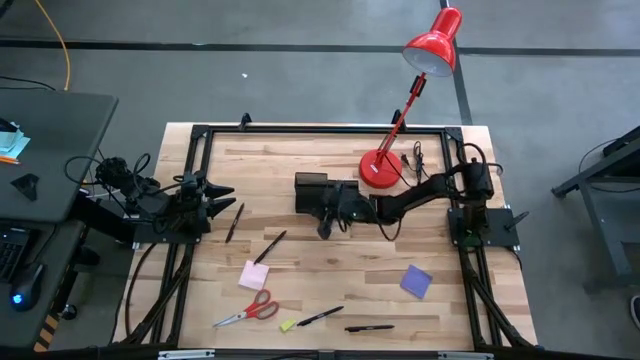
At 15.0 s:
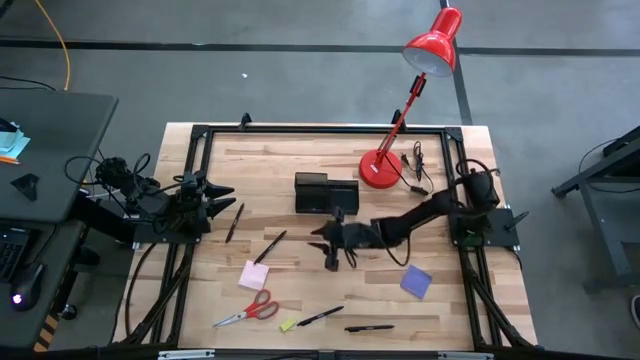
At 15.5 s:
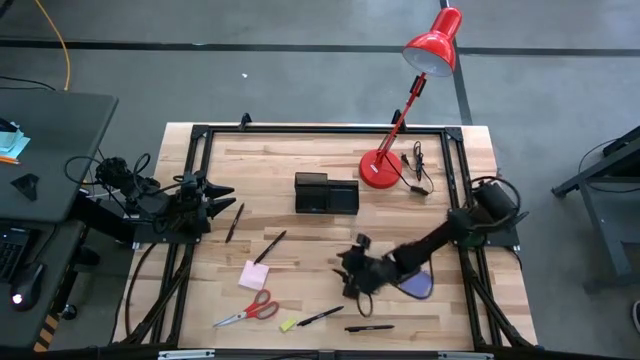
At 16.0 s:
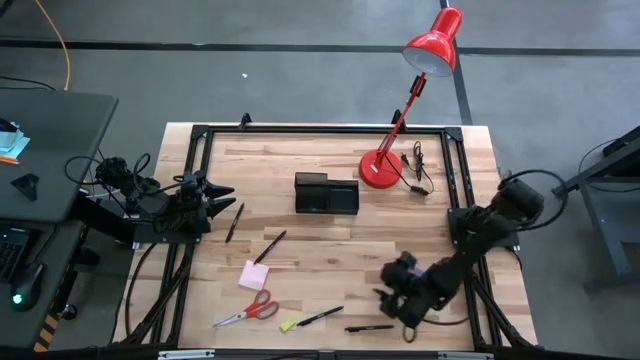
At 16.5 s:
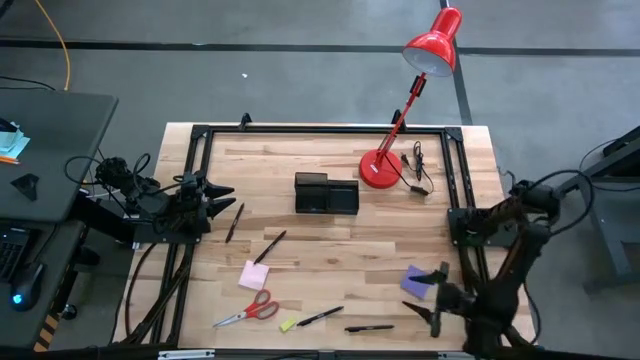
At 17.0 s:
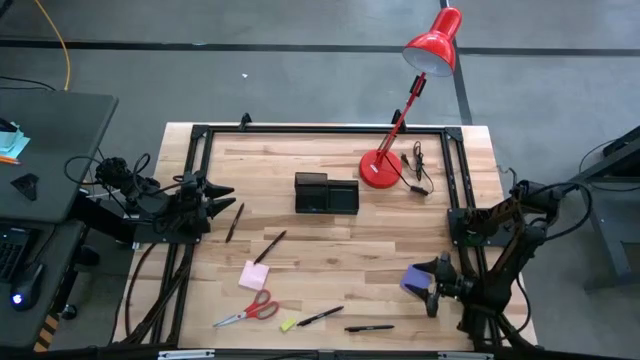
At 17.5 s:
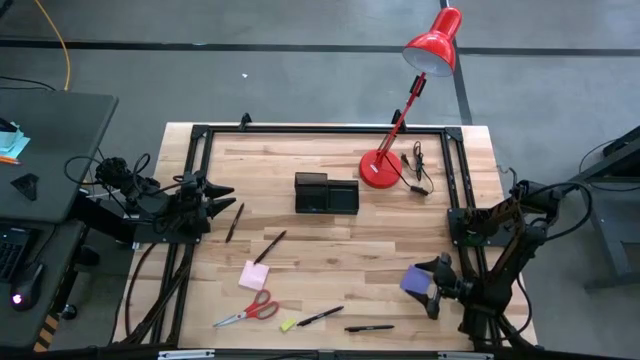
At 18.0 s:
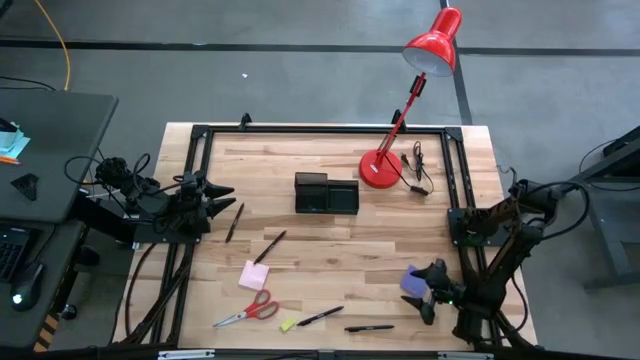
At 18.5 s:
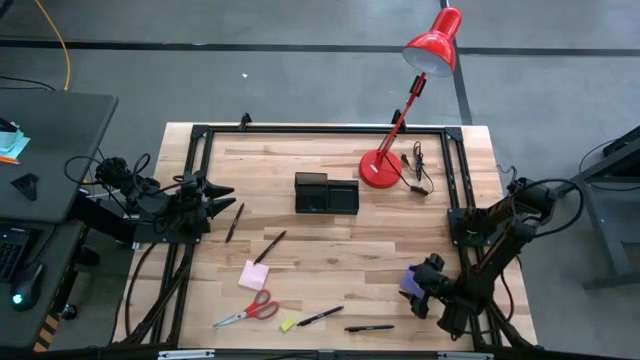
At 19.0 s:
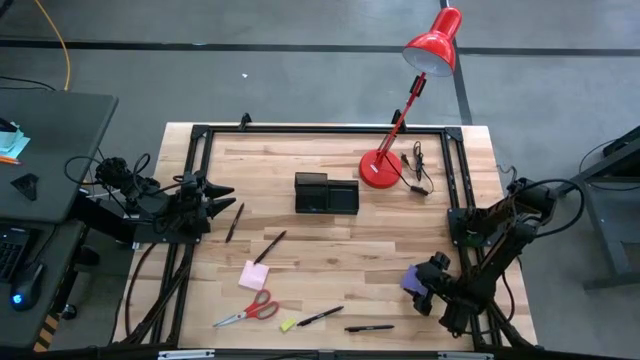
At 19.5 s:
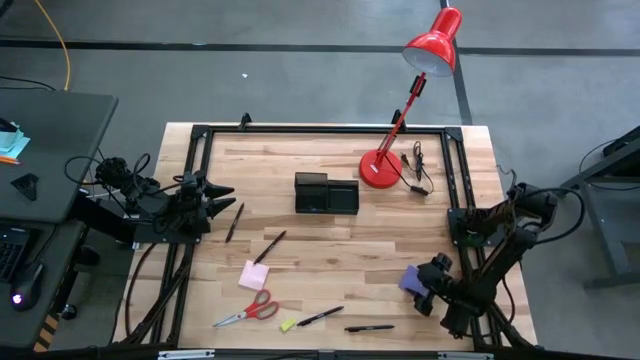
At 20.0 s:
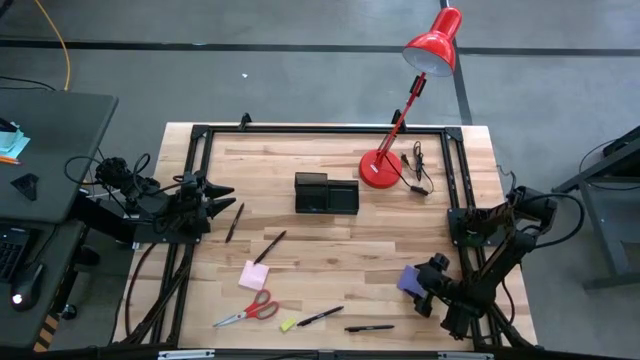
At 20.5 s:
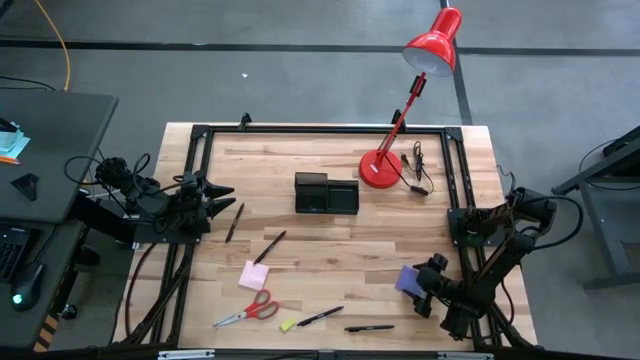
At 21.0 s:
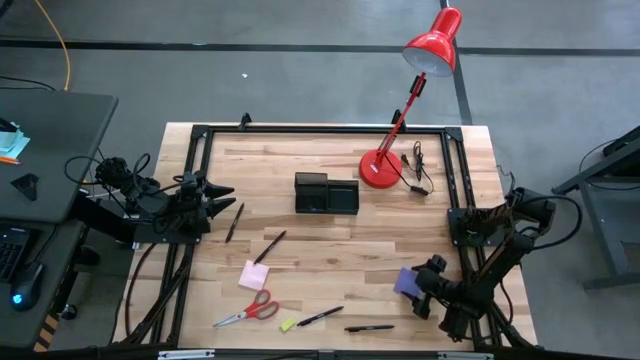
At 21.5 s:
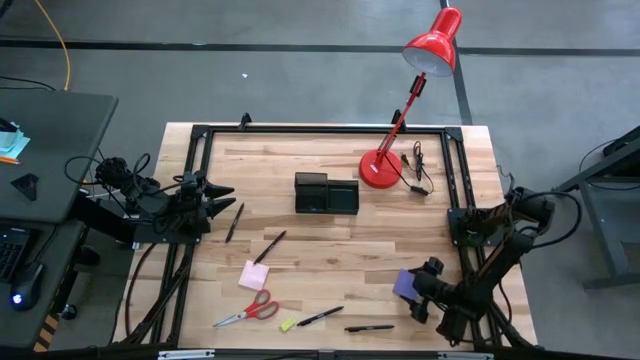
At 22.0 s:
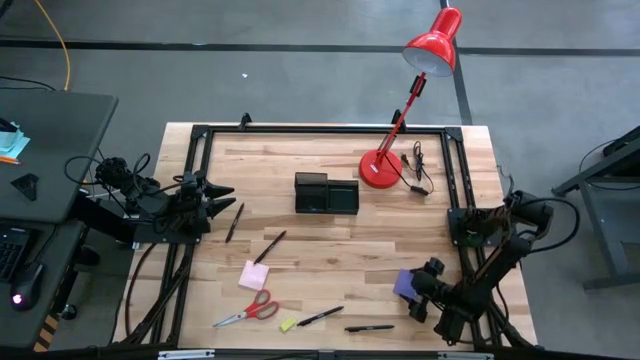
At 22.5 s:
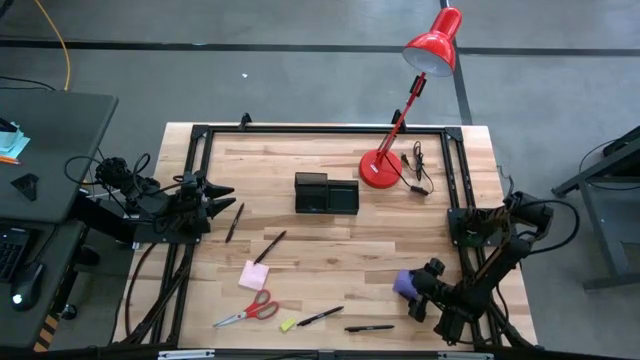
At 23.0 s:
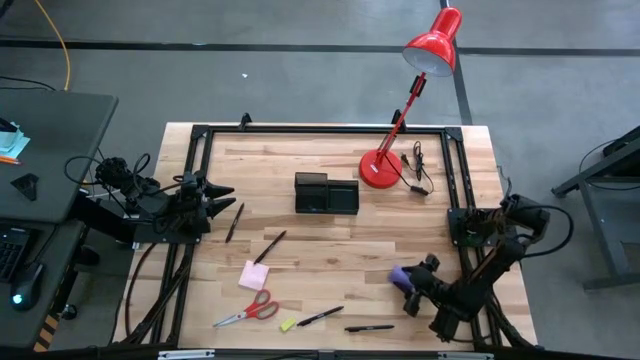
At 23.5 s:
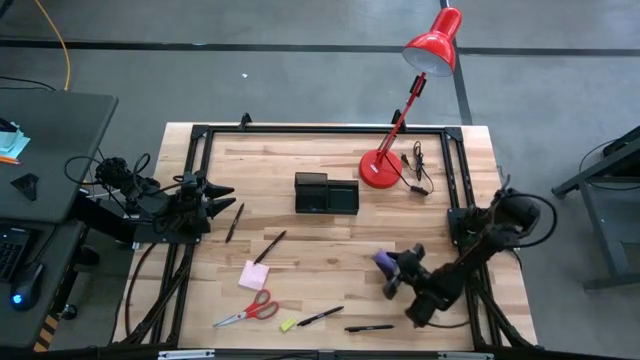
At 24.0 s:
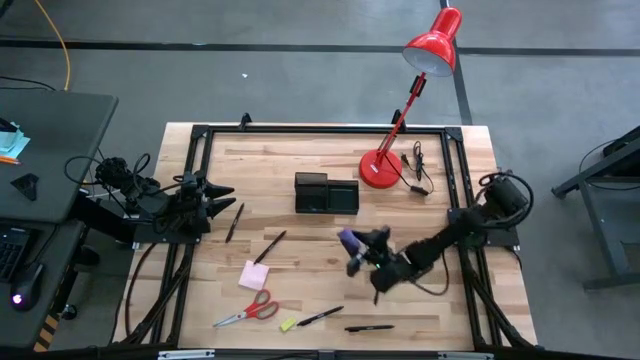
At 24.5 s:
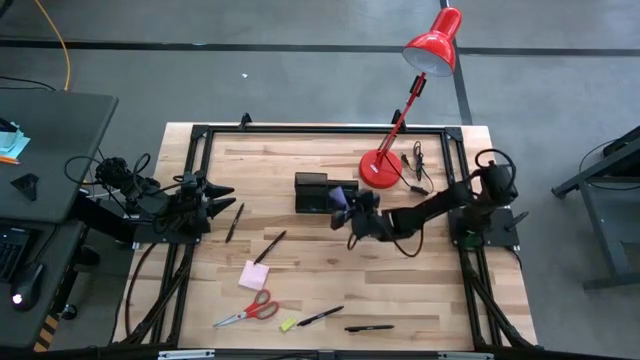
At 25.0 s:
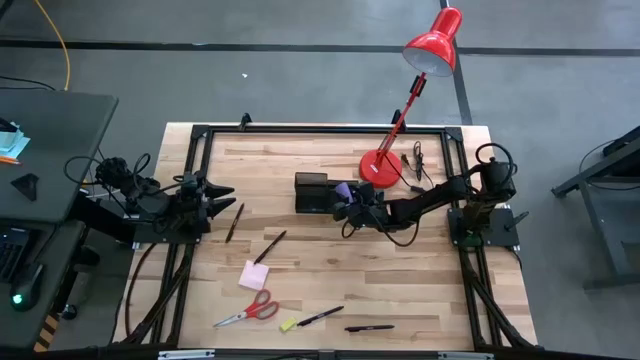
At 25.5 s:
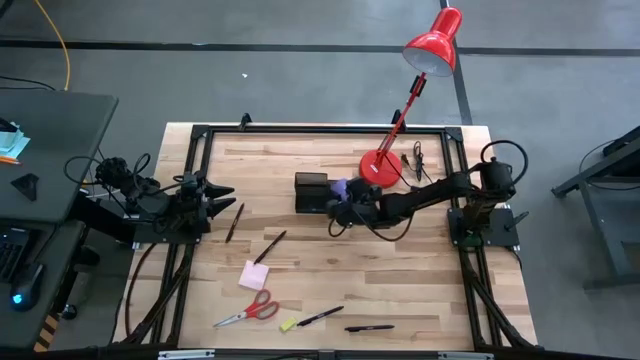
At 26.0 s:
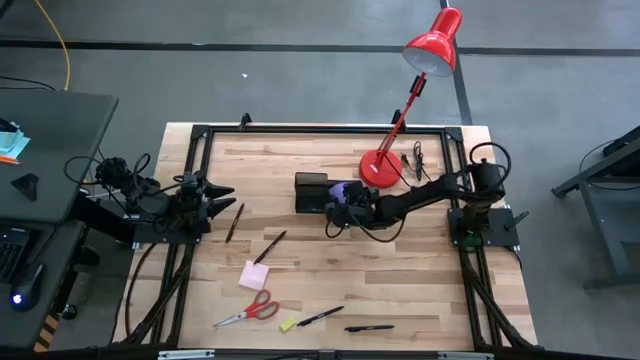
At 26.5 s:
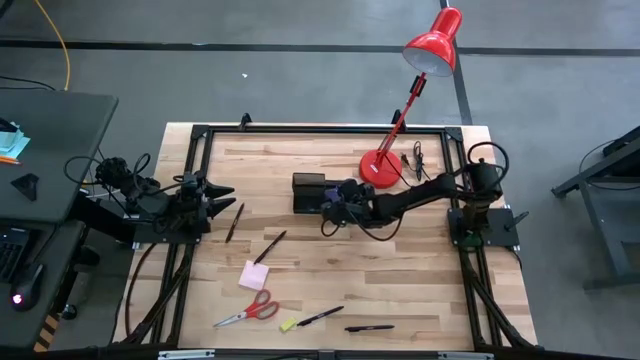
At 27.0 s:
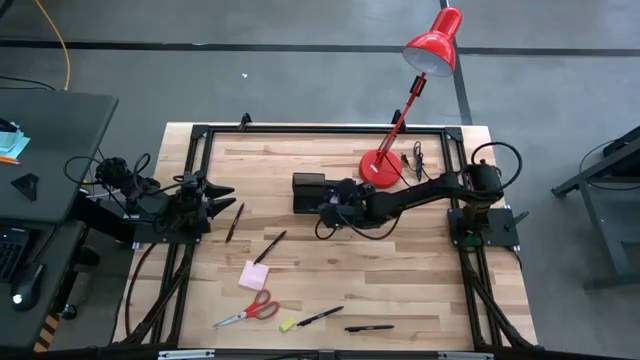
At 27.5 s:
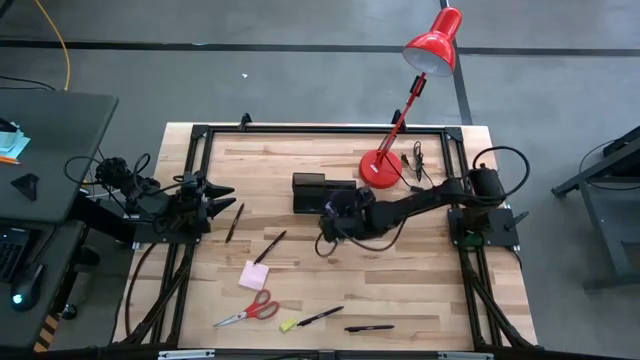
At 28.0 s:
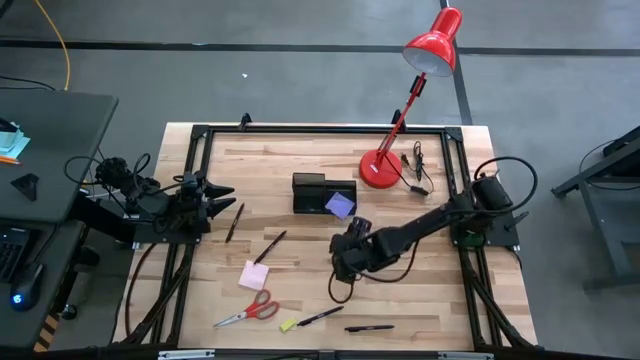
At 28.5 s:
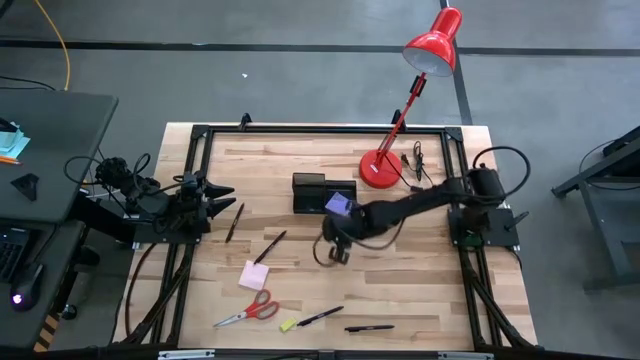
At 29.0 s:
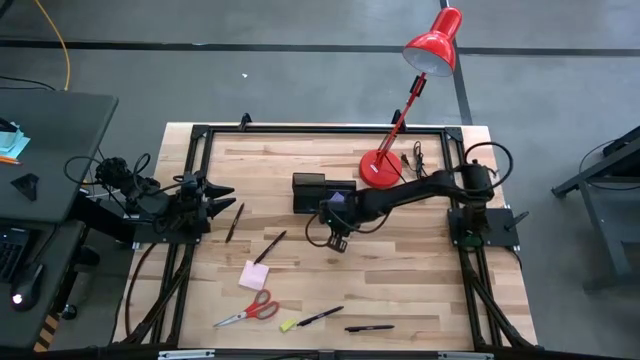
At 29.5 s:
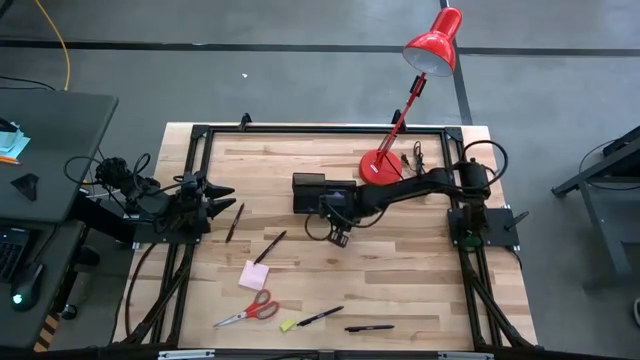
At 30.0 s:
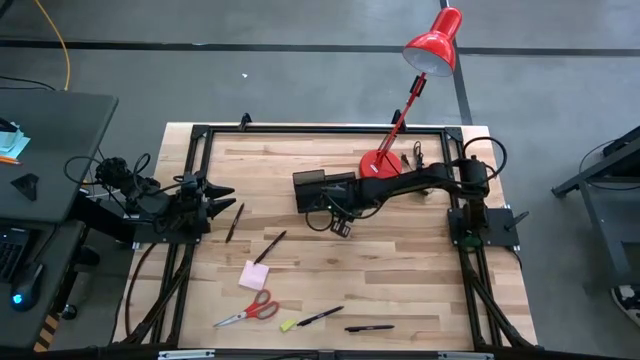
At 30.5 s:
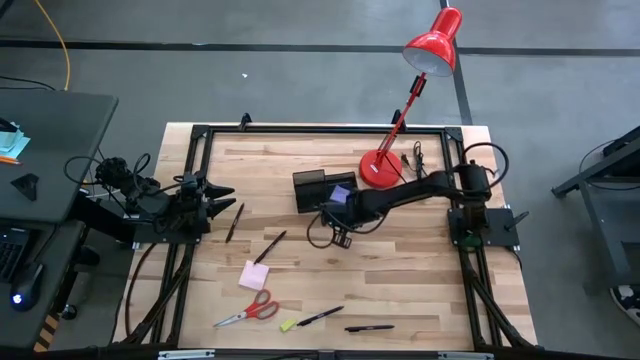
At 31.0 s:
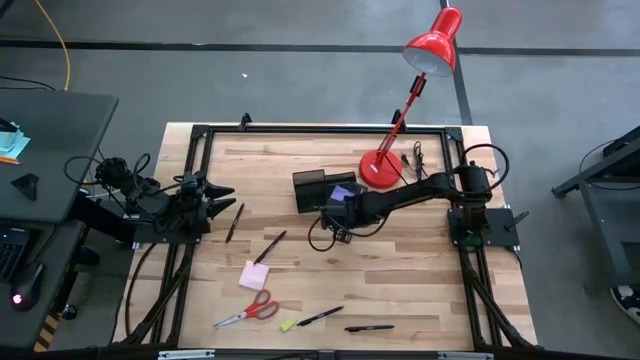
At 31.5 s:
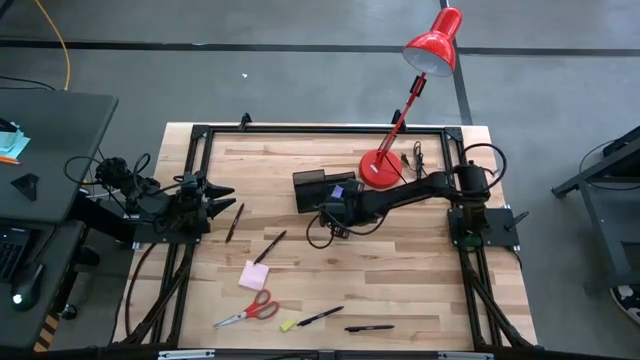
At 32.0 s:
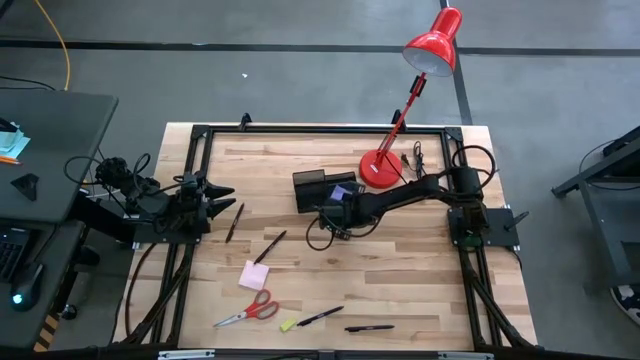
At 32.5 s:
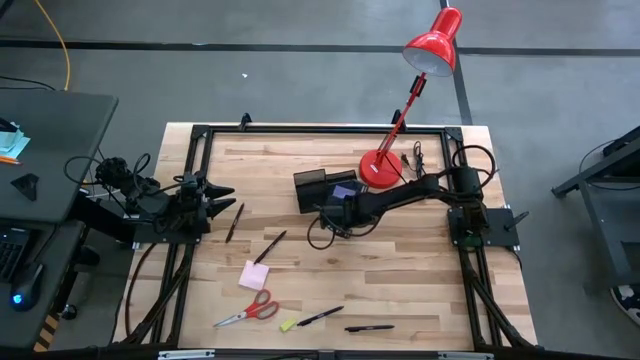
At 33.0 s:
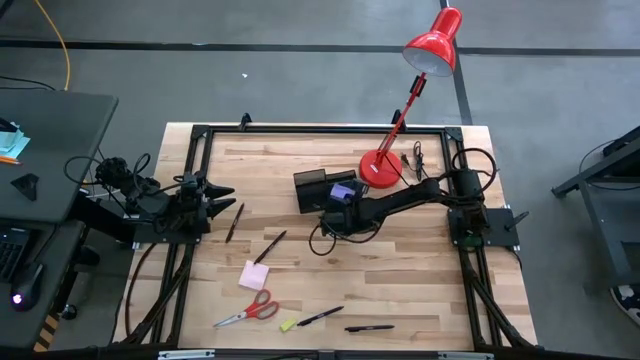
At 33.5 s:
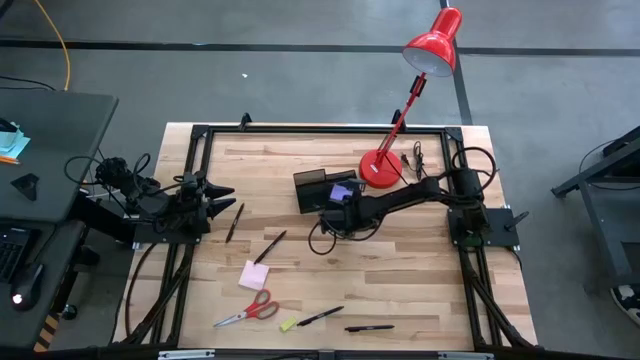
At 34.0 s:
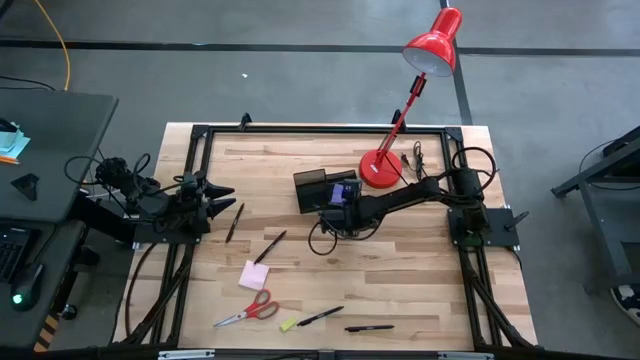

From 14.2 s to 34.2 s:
Task: Pick and place office supplies into organizer
Put the purple sticky notes into the black desk organizer
